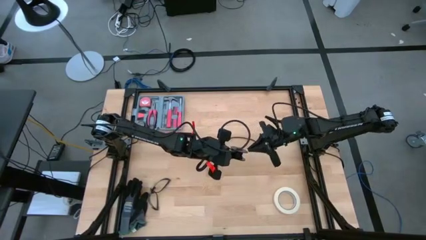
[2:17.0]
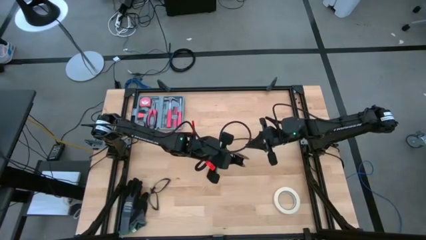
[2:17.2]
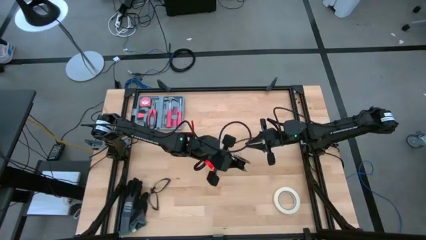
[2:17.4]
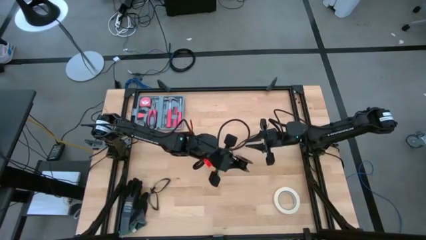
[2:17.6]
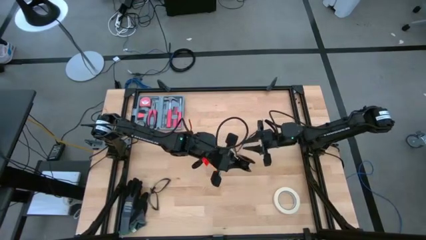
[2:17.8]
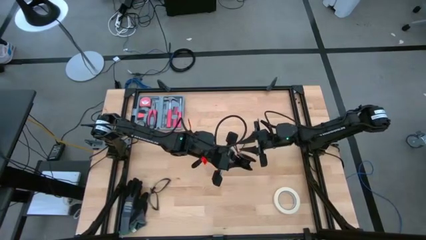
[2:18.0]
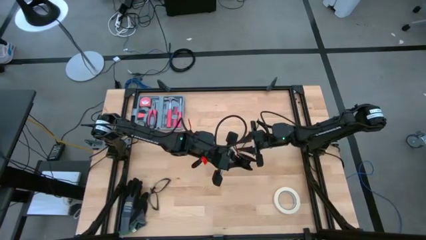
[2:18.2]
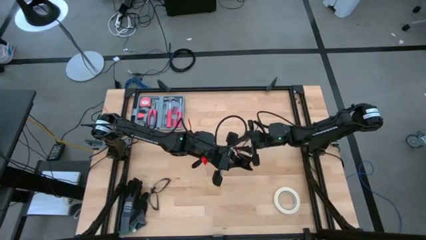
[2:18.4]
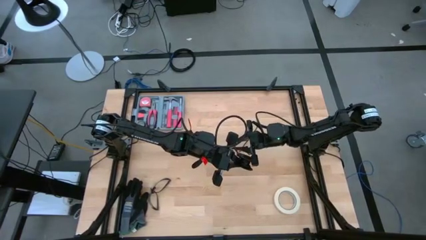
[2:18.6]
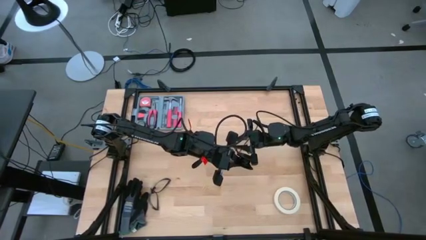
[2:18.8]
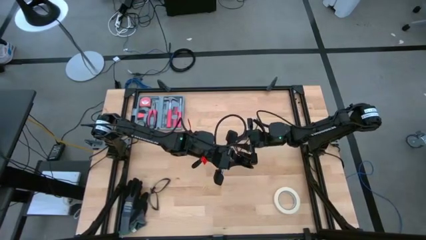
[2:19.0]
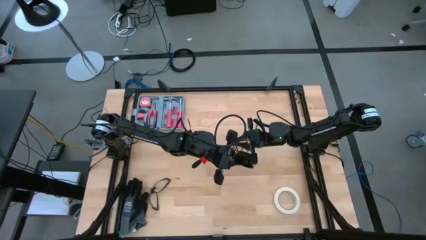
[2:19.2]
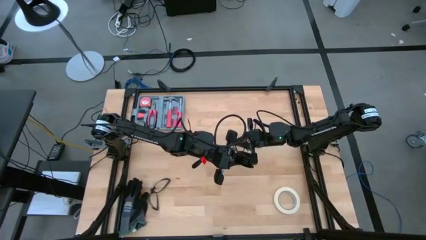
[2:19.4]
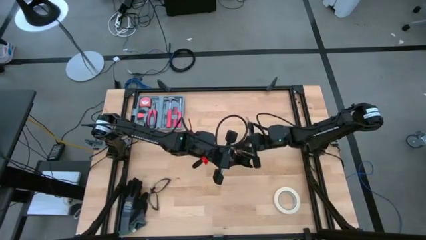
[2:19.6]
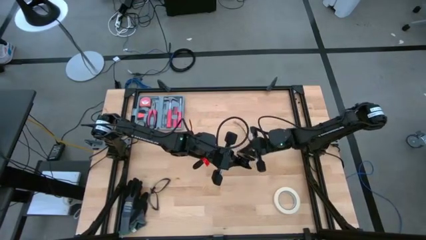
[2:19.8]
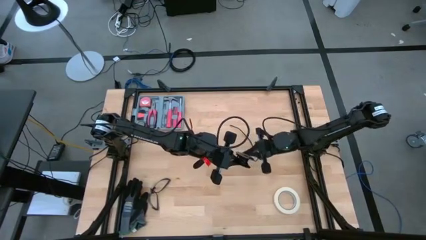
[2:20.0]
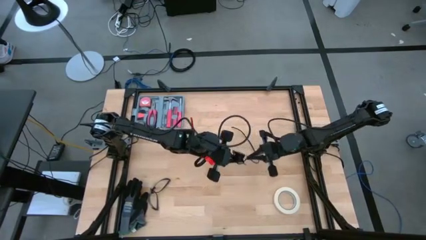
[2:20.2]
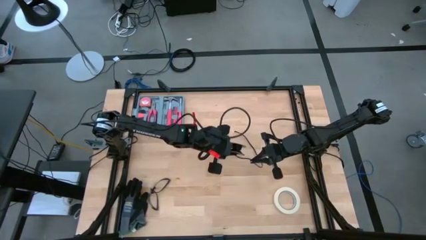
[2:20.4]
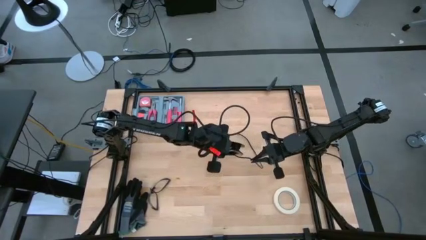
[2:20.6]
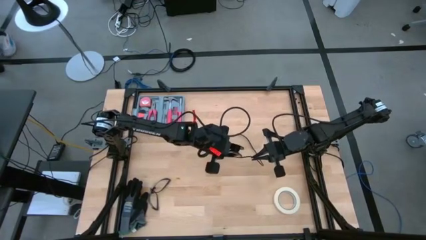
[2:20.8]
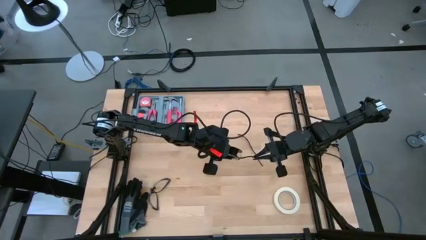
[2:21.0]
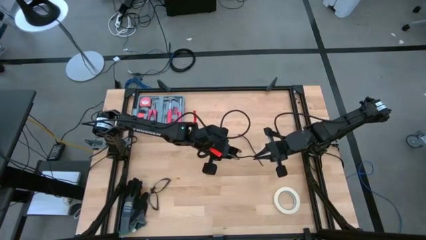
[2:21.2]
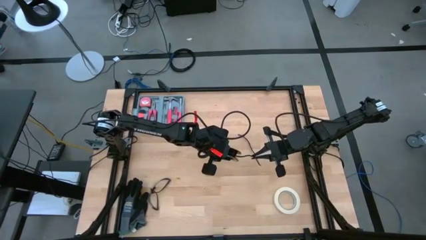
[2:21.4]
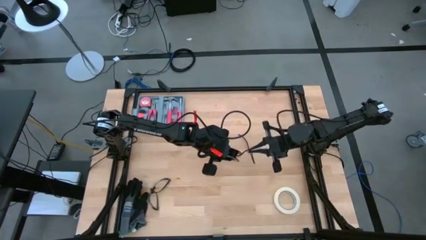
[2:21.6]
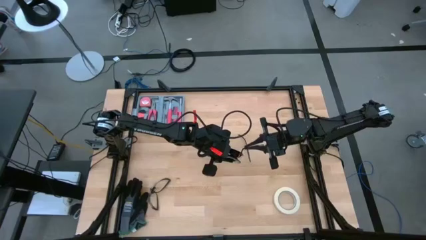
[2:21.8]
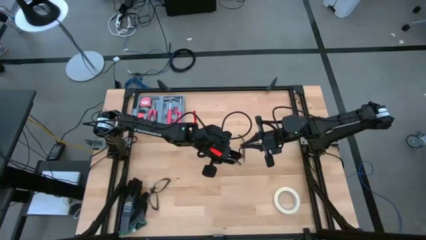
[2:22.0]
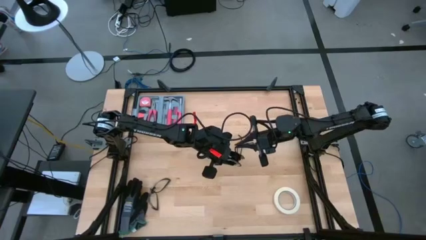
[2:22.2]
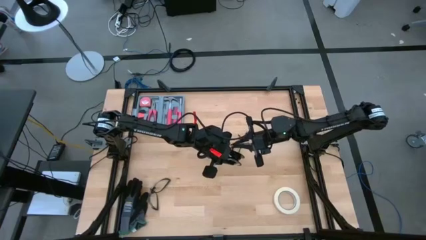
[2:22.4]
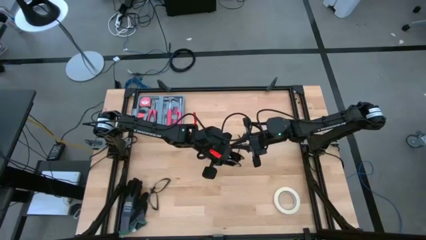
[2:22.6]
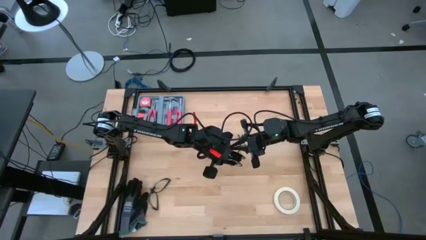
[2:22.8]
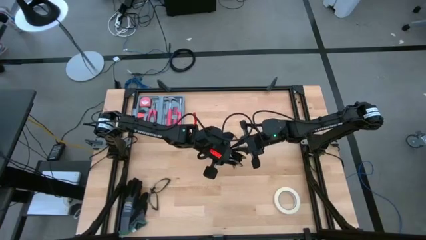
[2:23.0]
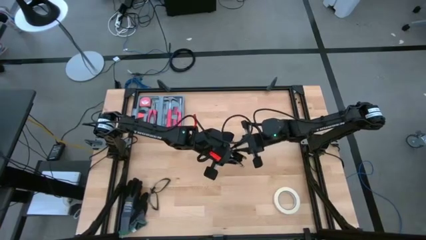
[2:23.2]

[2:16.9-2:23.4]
Task: Coil cords
Coil the black wire onto the spool

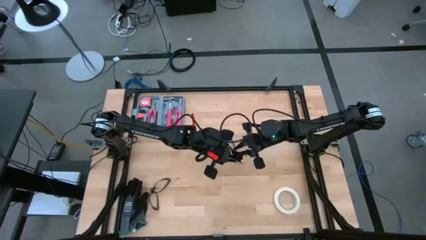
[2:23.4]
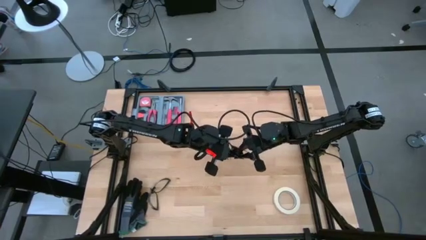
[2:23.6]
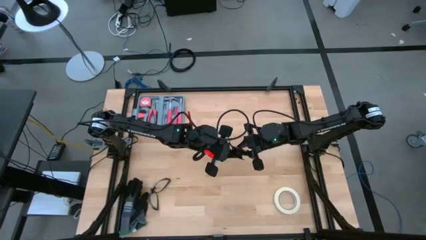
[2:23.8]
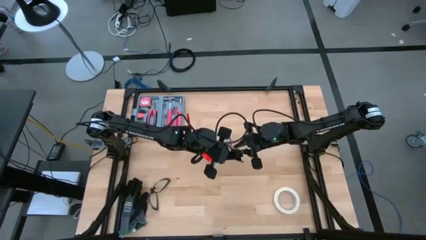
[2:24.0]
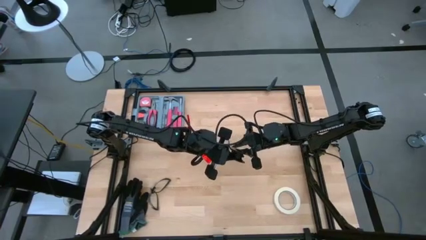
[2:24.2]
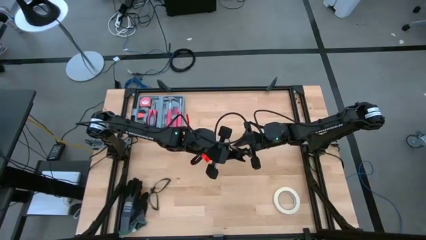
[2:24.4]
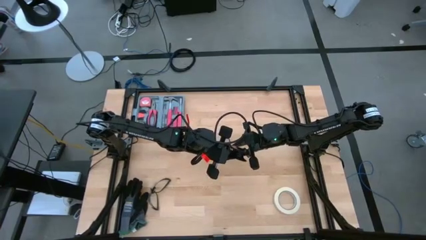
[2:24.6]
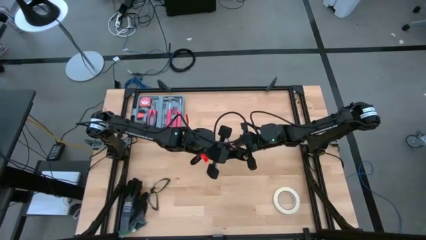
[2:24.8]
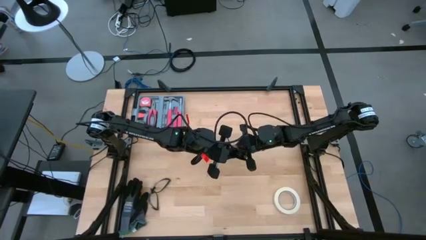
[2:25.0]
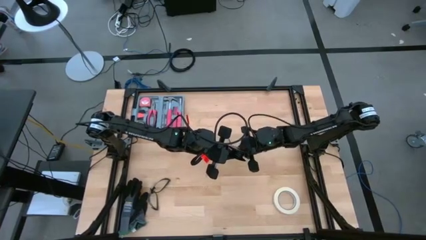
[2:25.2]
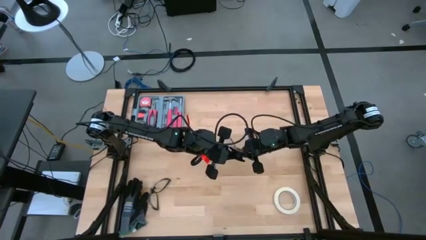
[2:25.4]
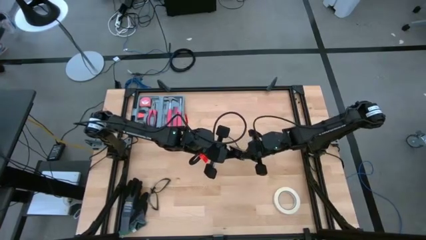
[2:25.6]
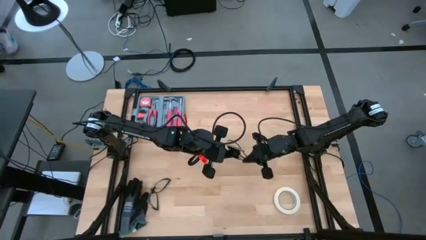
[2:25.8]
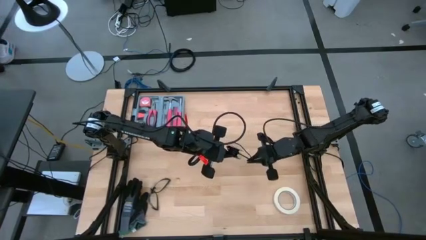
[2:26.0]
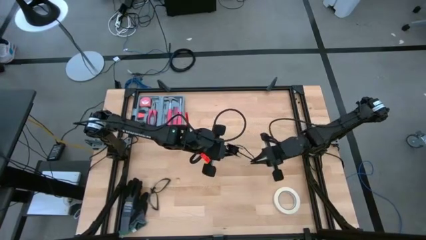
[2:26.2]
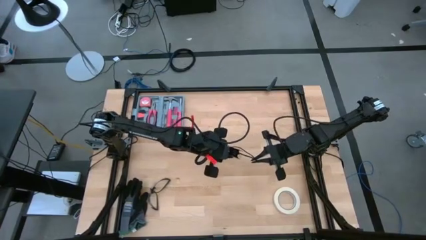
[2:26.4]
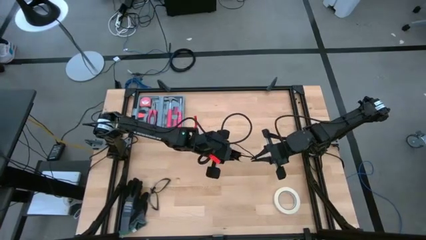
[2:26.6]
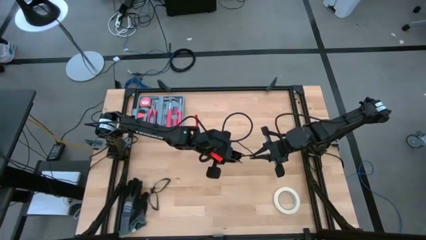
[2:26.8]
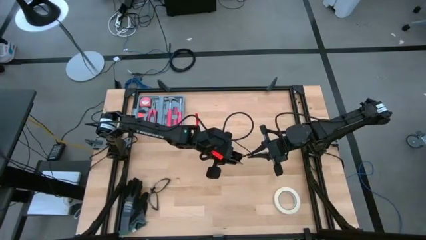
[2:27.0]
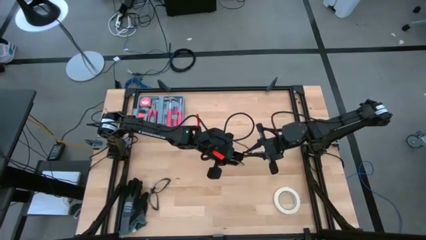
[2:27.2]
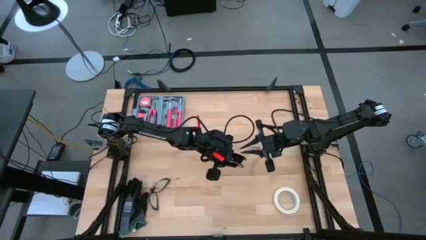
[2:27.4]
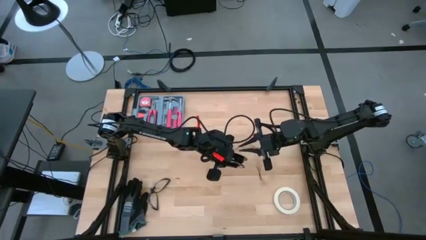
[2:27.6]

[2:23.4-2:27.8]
Coil the black wire onto the spool

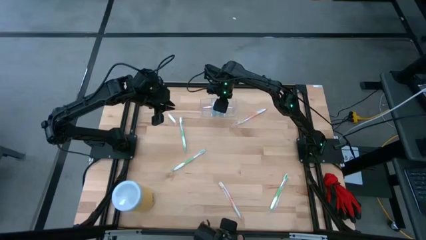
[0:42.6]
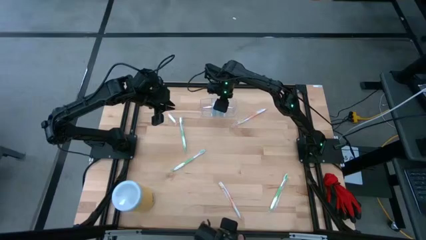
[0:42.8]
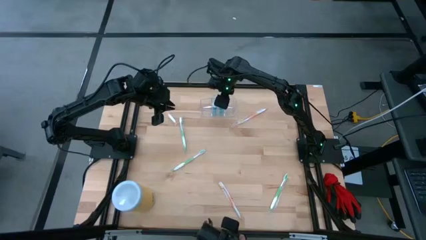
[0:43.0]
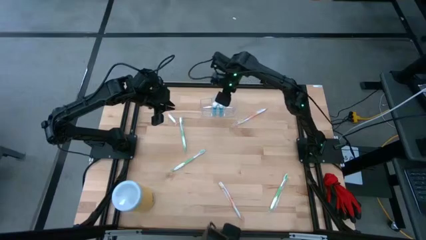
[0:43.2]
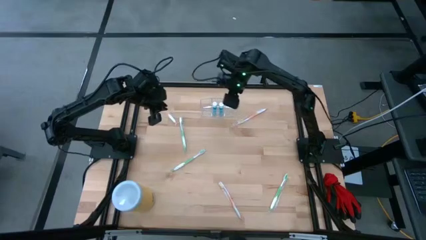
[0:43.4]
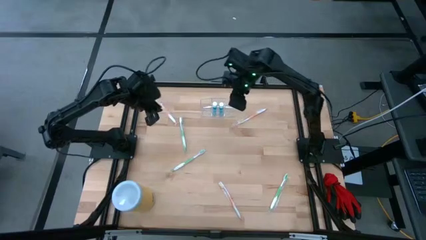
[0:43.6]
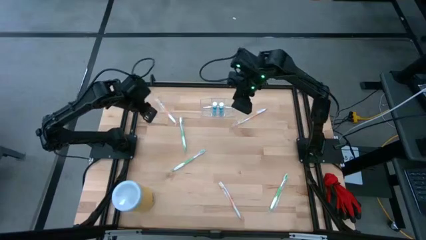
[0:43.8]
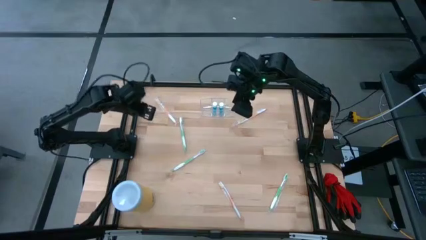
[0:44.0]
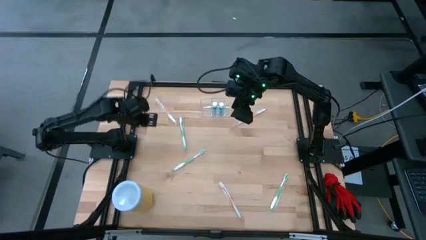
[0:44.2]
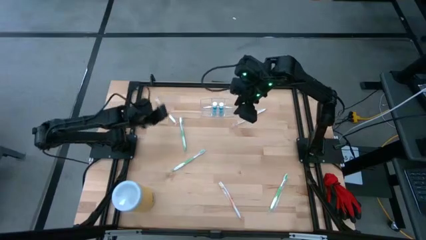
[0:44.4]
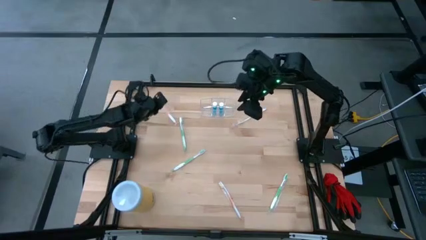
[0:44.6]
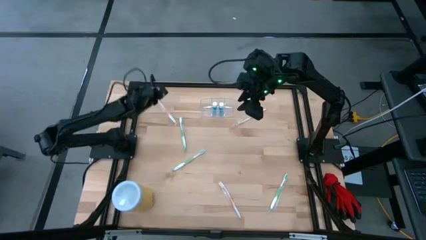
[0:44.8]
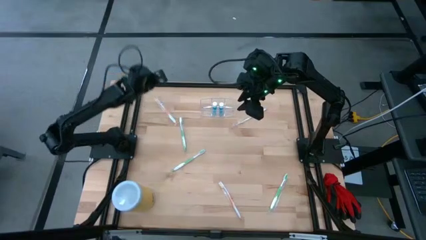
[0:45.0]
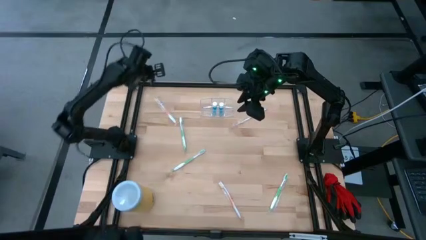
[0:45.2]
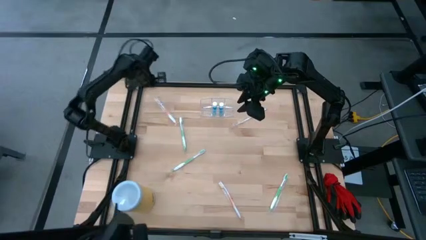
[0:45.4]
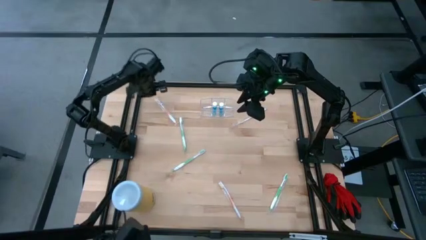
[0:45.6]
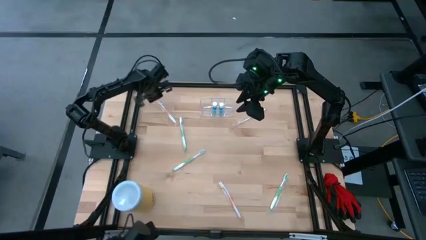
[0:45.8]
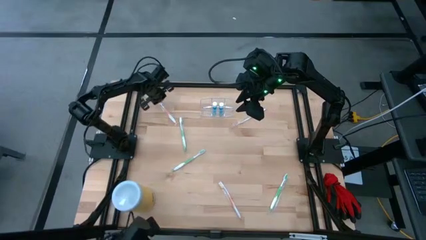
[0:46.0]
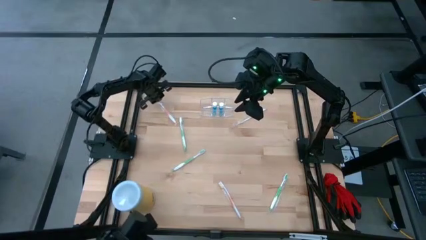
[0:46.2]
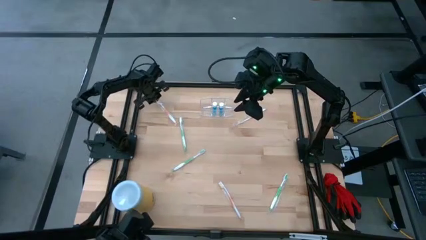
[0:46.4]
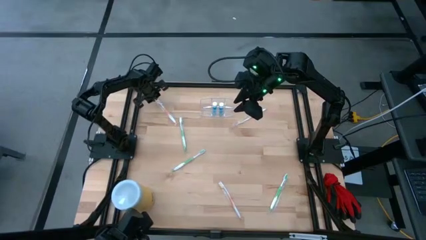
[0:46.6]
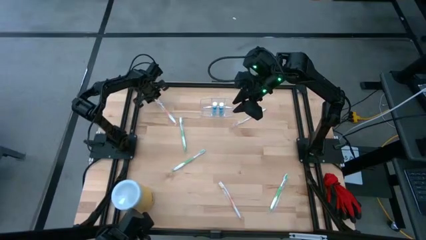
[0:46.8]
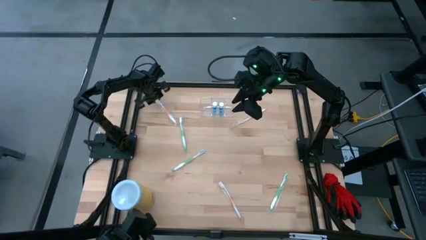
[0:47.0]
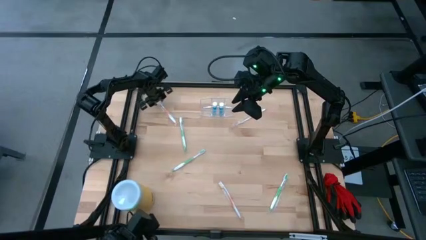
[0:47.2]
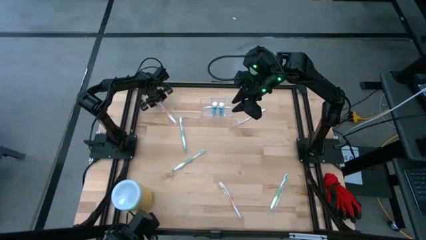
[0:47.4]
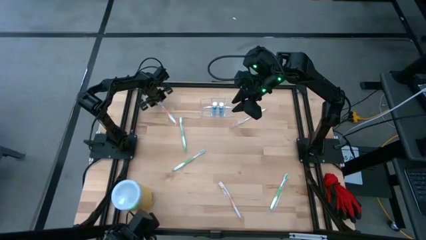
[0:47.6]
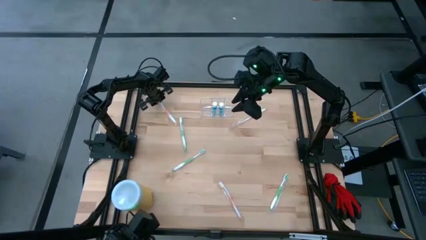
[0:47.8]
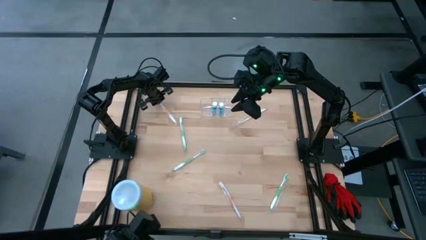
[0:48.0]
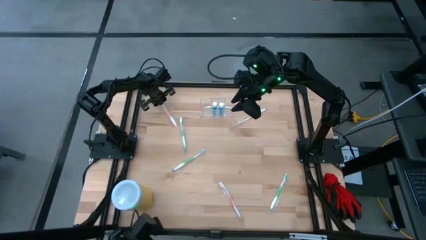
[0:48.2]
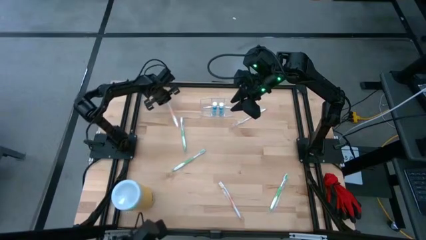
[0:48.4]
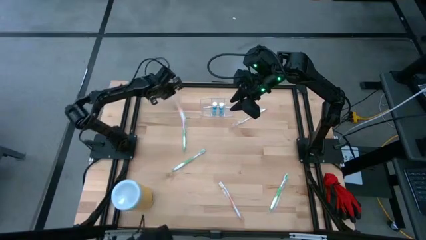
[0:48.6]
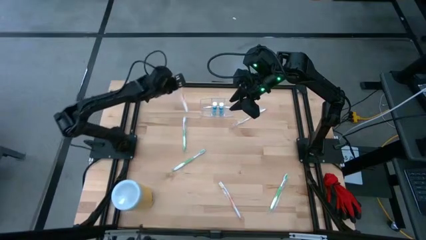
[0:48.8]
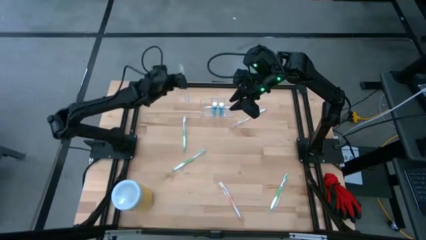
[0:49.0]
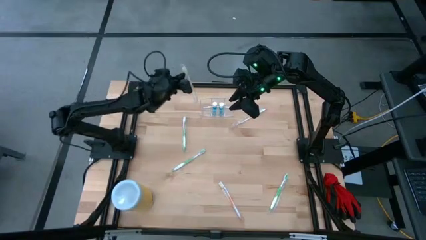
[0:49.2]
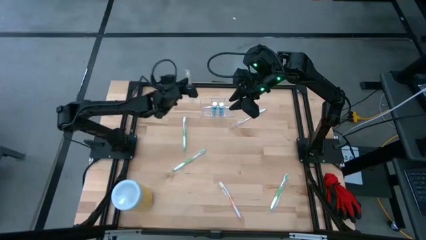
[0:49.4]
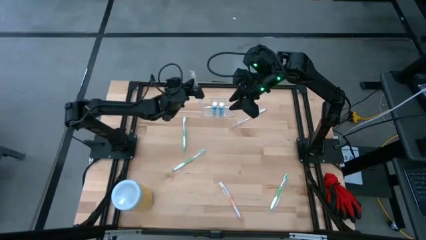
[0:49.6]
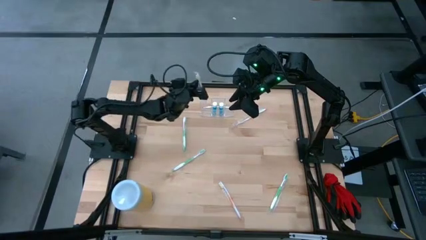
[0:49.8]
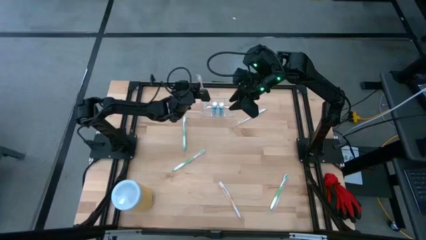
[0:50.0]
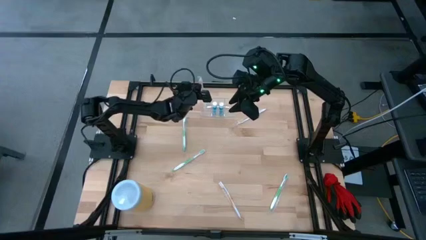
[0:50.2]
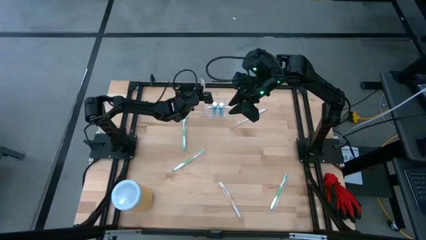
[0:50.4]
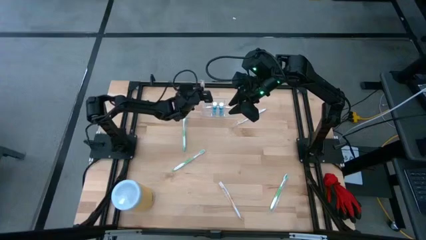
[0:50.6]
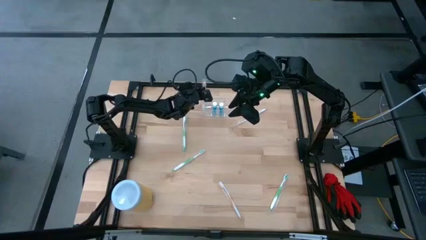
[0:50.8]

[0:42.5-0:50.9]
Task: Pick & Place toothbrushing station
Put the top left orange toothbrush into the transparent organizer
